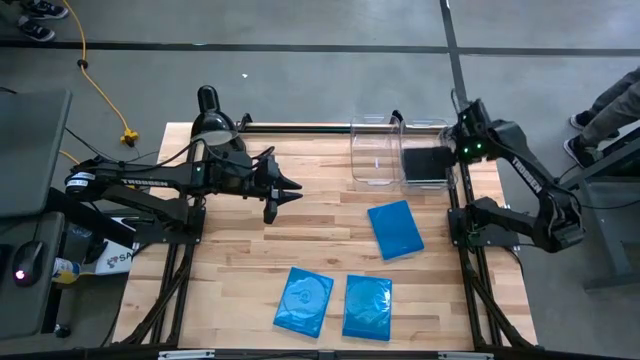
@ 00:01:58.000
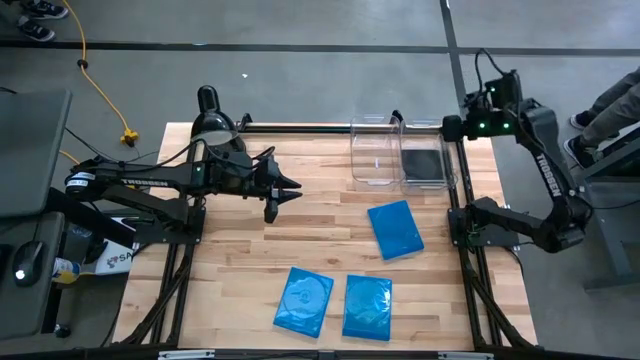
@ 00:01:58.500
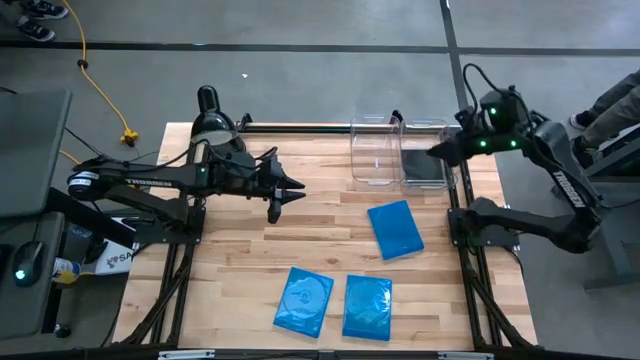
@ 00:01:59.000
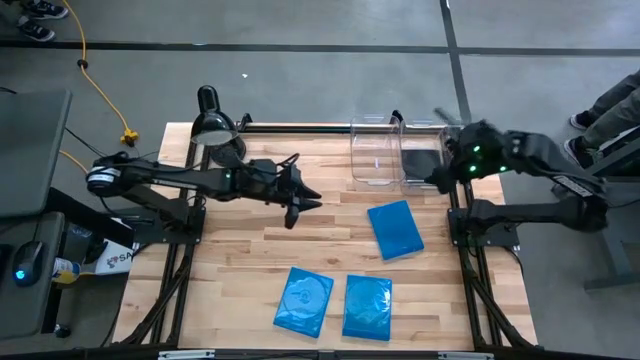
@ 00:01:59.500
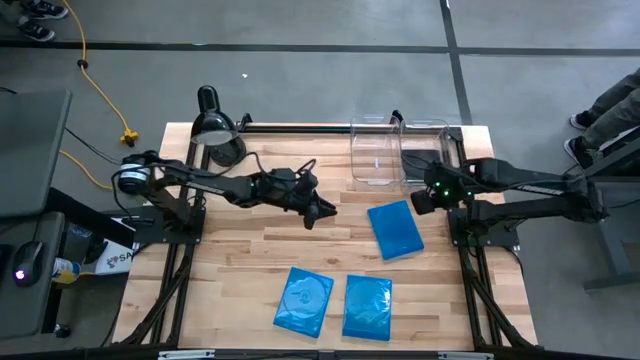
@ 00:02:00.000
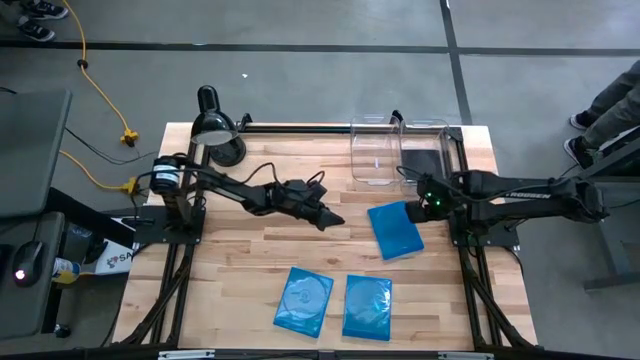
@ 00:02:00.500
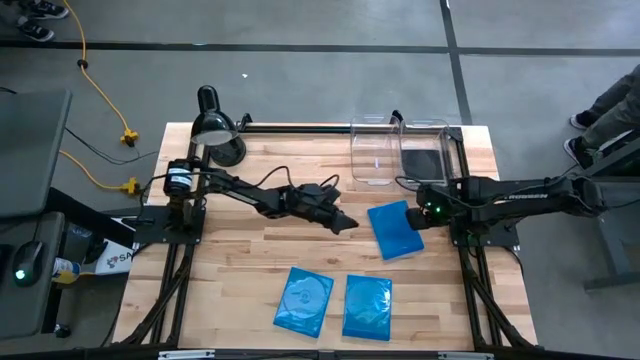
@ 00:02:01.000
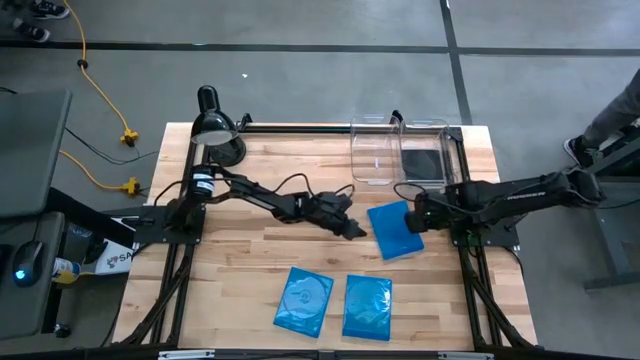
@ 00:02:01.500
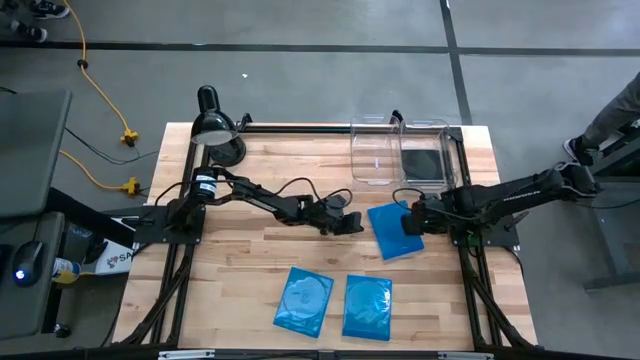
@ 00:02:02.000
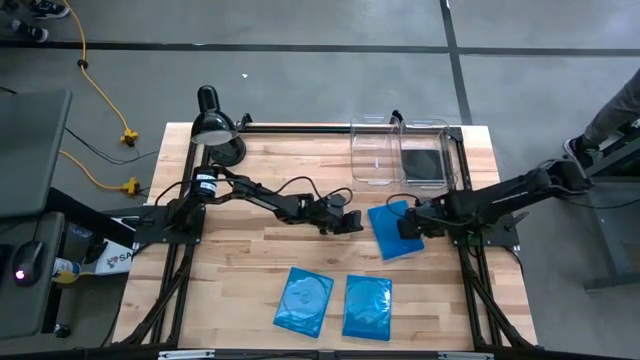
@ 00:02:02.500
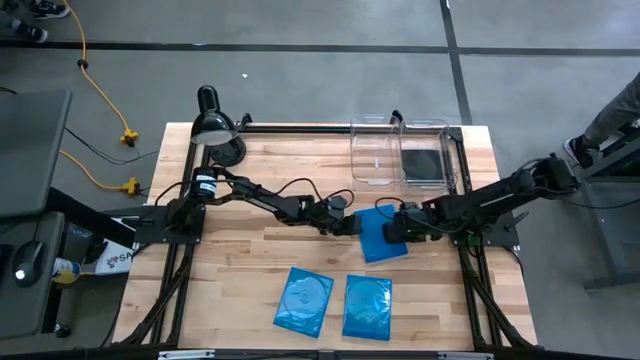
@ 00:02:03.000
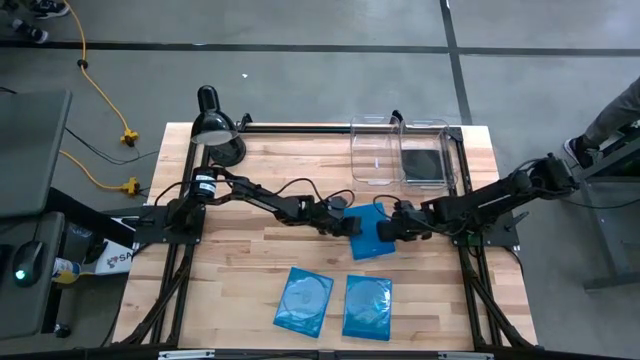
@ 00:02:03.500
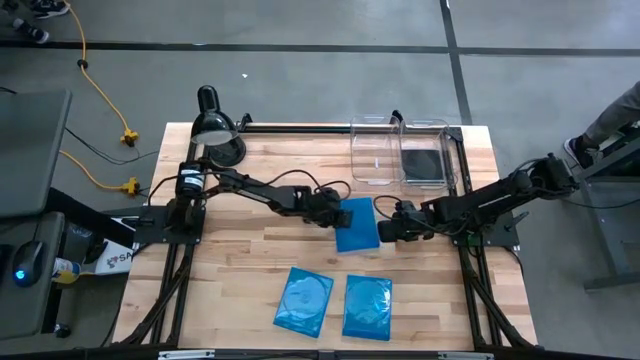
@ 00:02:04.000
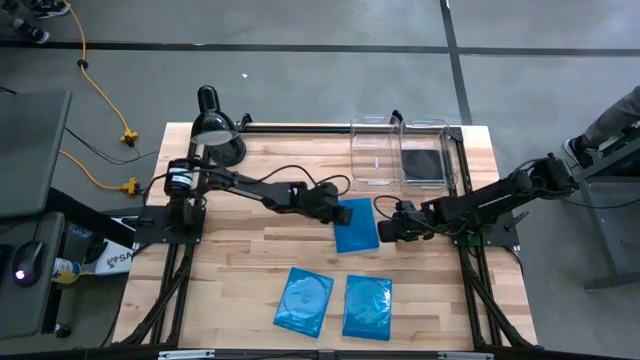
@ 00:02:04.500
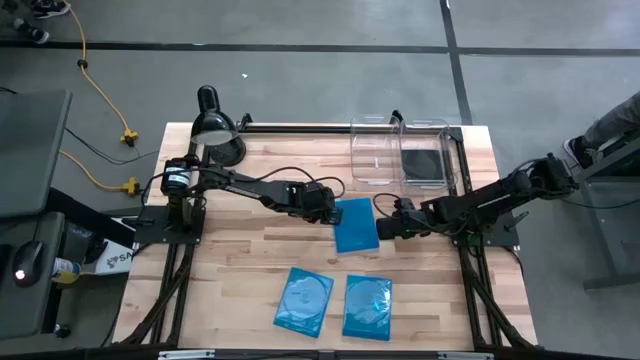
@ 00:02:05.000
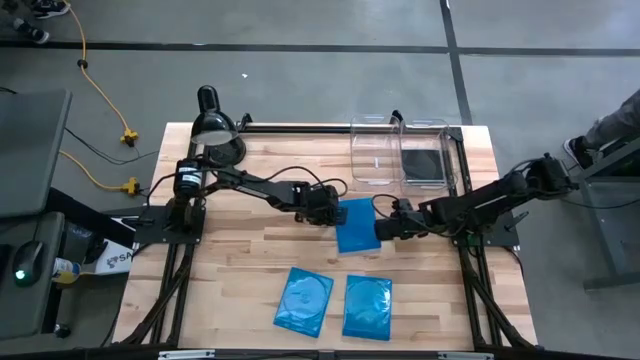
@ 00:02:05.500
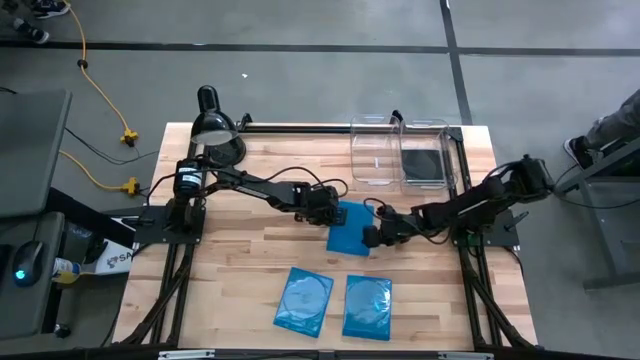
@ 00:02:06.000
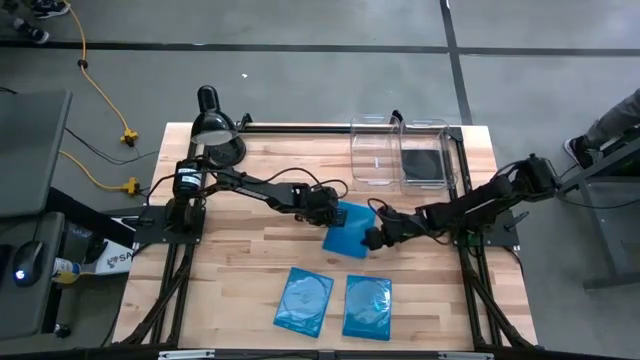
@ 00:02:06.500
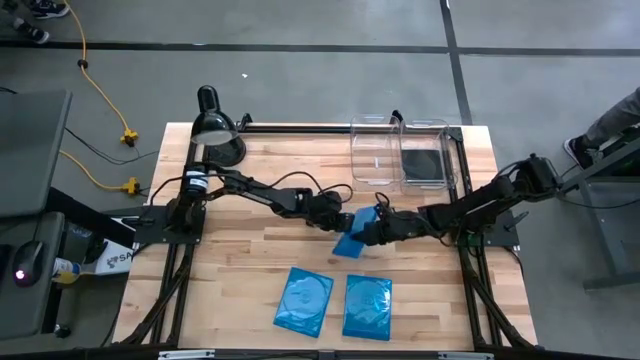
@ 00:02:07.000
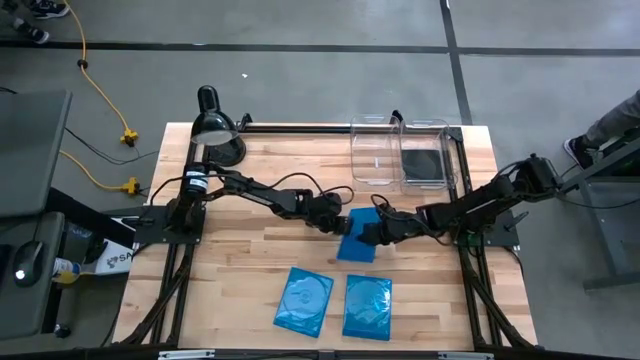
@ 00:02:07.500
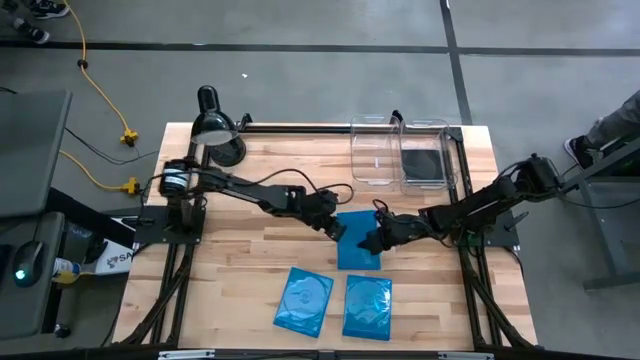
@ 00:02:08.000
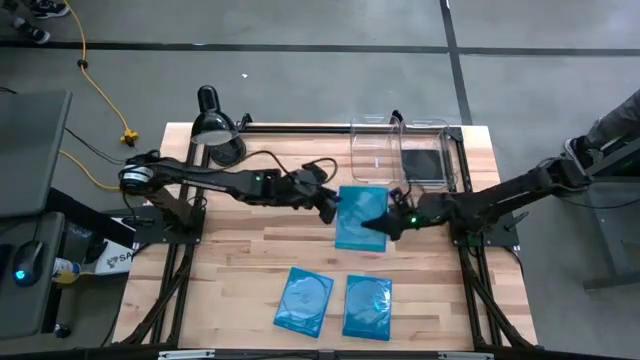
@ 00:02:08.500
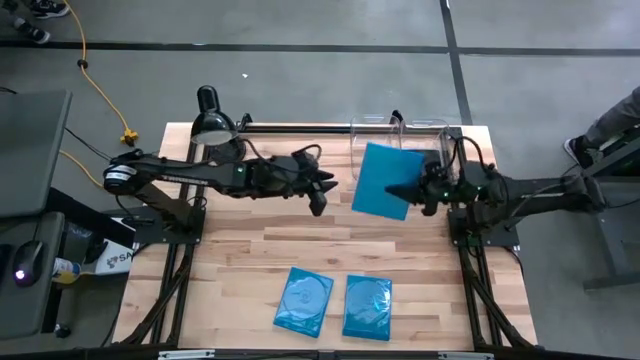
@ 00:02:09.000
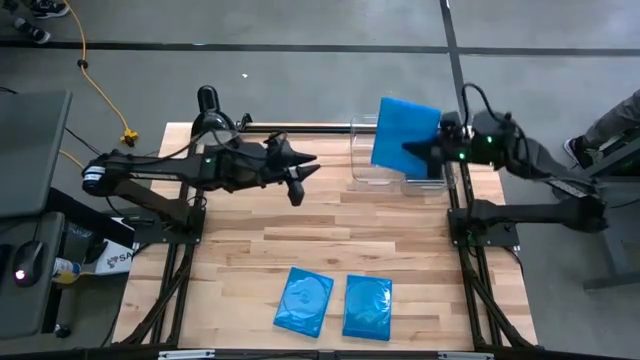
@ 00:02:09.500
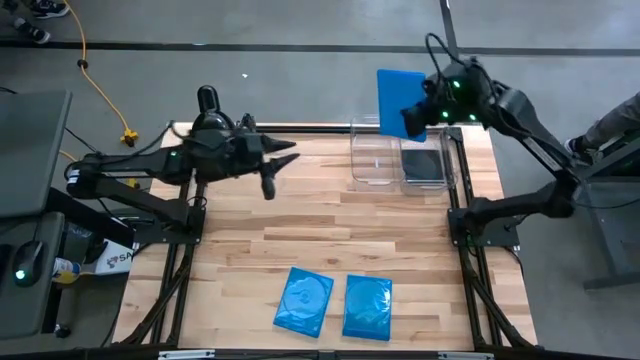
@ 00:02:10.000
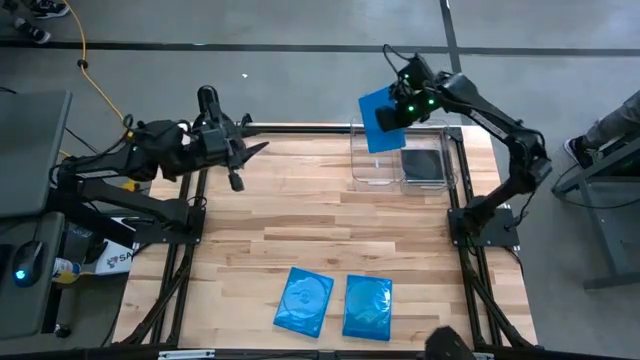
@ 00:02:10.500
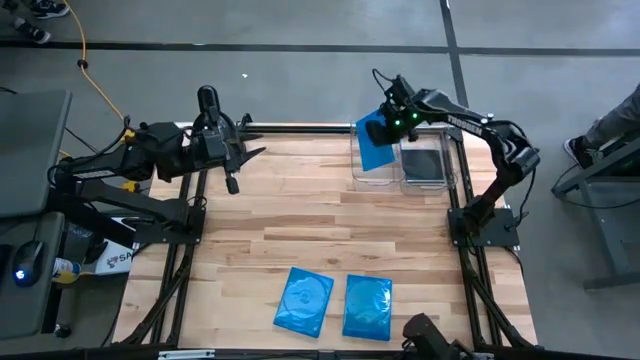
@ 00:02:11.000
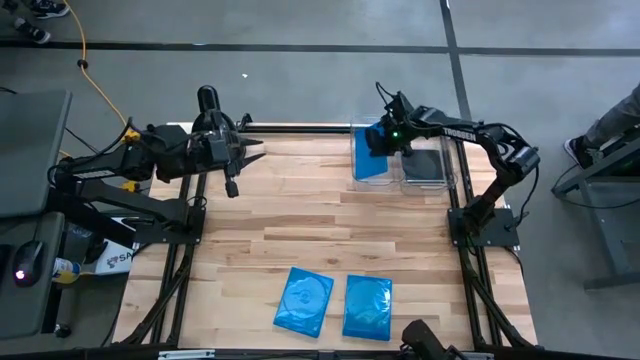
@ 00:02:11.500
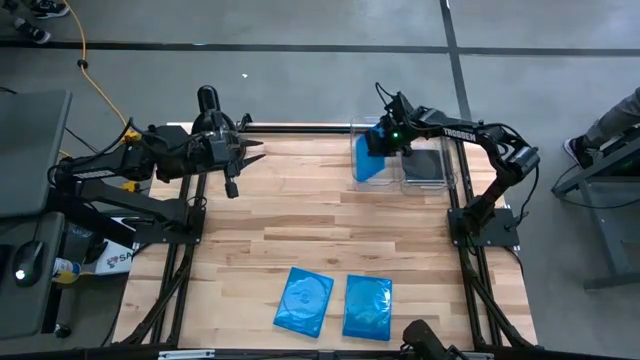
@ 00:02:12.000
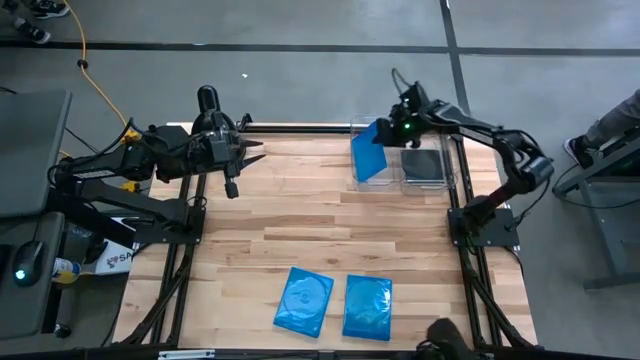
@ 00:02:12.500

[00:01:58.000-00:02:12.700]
Task: Pick & place jewel cases by type
Put the top blue CD case into the left transparent bin
